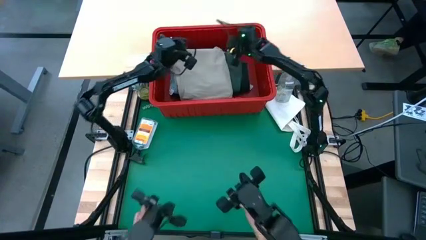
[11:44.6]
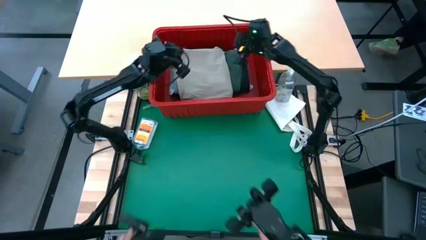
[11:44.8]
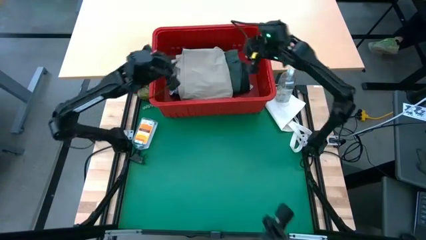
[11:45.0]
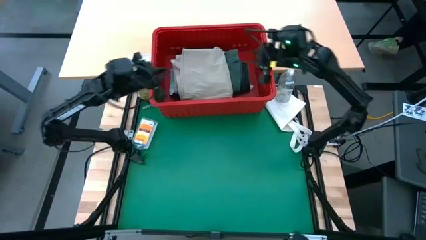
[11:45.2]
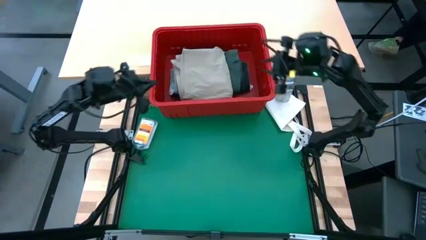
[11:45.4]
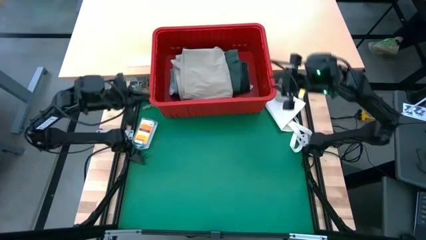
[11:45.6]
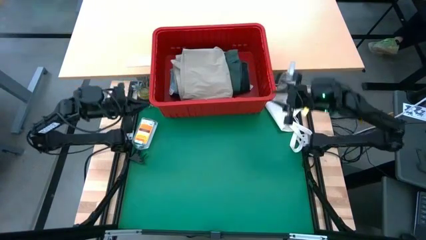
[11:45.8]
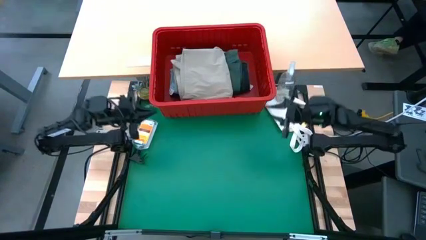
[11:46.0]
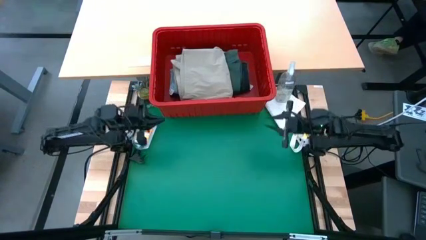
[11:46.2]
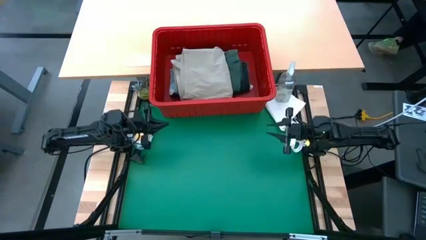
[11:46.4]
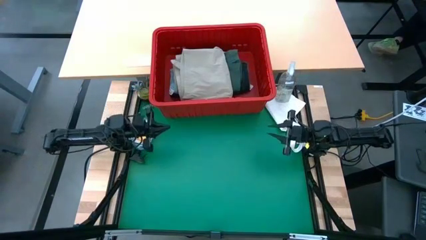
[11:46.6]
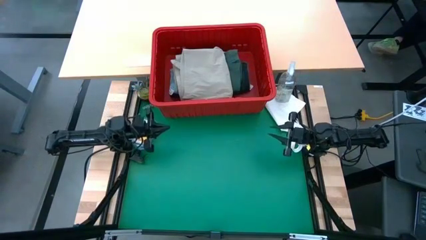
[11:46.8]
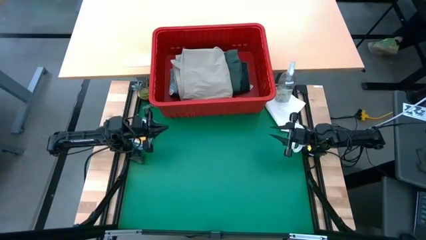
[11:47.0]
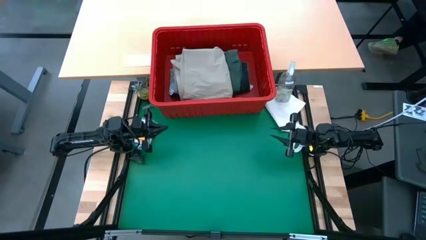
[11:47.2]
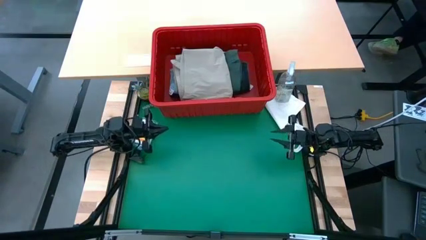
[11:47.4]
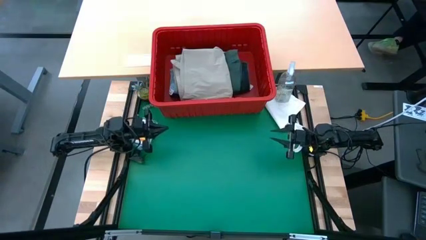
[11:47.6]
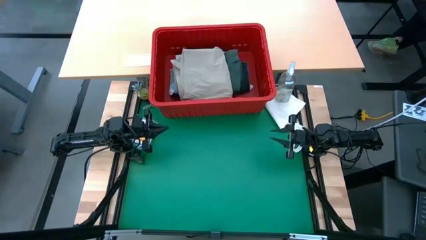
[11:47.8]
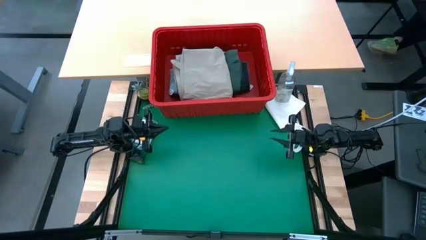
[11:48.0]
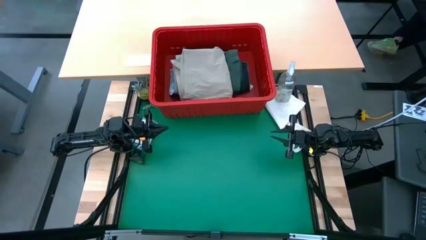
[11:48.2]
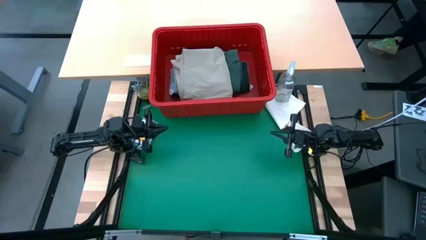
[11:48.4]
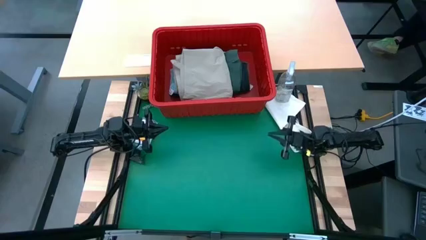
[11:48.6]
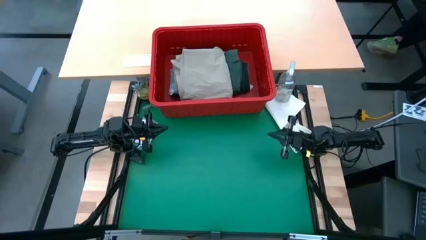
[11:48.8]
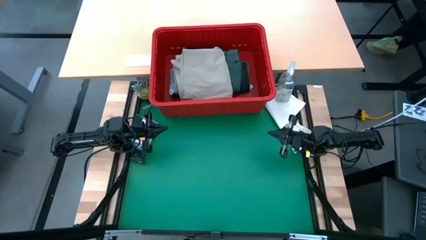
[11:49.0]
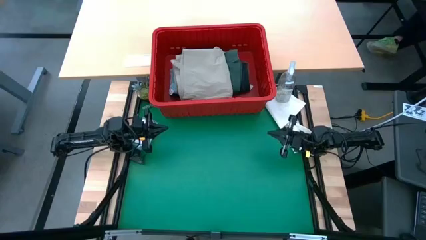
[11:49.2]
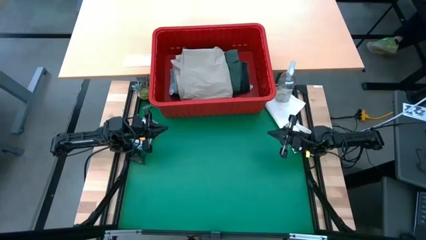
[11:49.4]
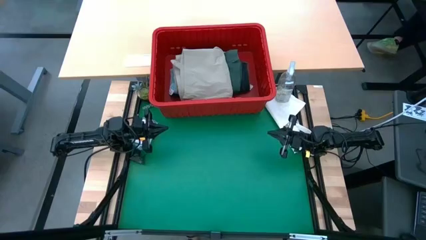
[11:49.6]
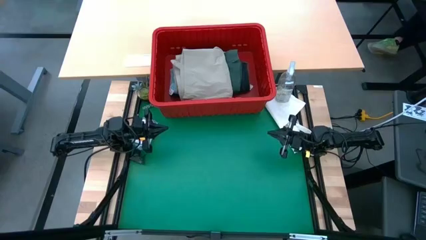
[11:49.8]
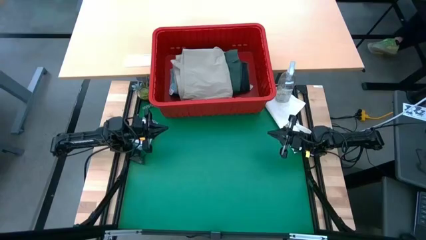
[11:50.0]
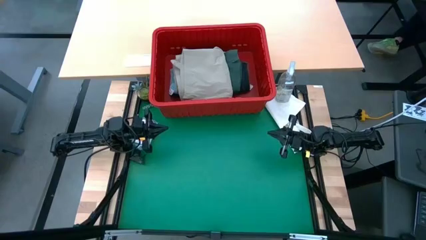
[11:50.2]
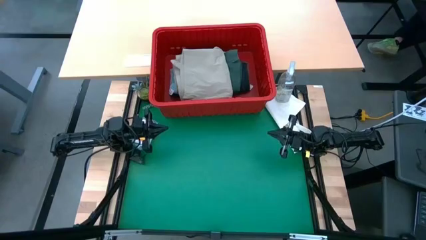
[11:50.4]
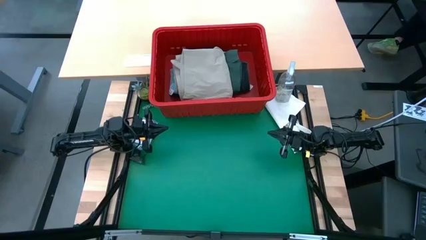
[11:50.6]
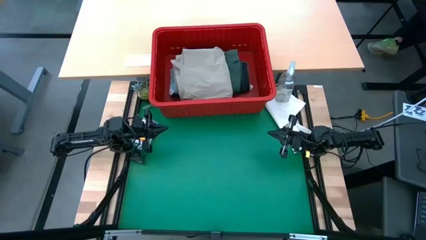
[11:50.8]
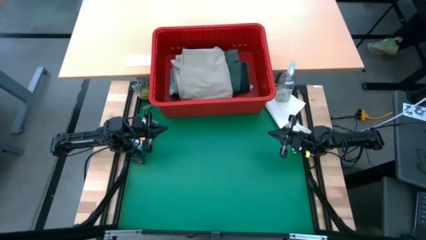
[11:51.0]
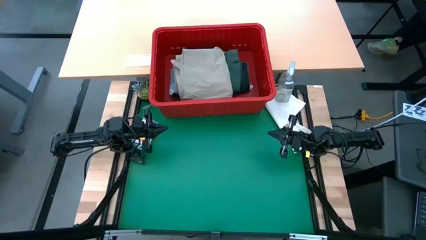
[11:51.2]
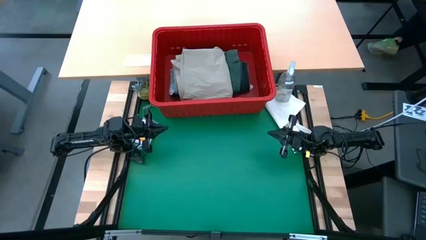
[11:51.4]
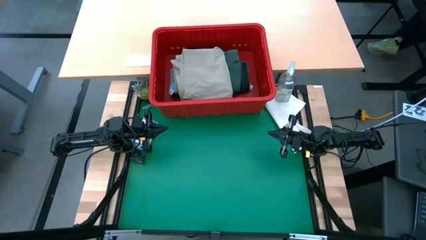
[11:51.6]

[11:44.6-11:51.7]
Task: Fold laundry
Return to Home Position

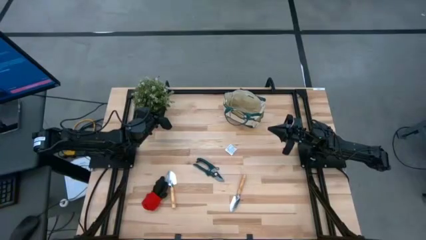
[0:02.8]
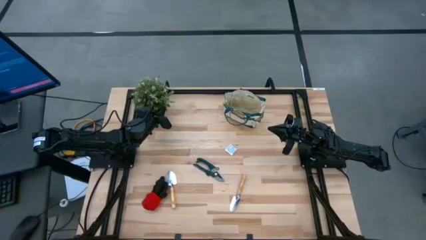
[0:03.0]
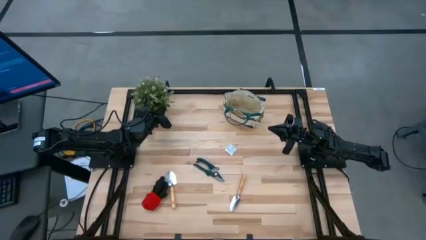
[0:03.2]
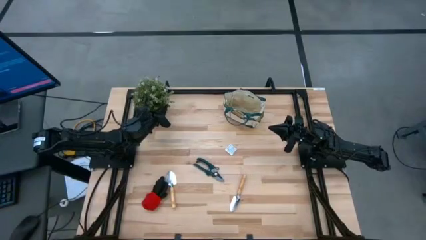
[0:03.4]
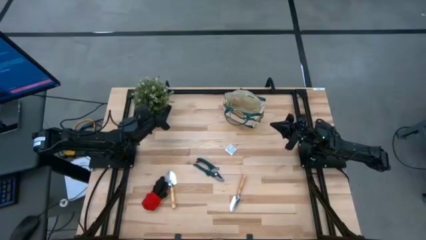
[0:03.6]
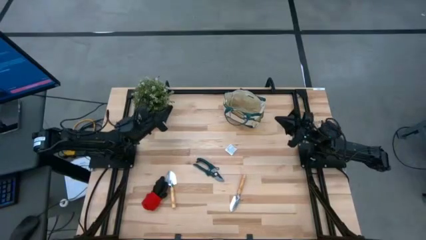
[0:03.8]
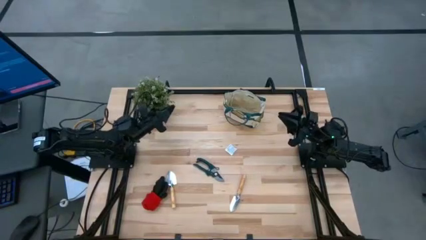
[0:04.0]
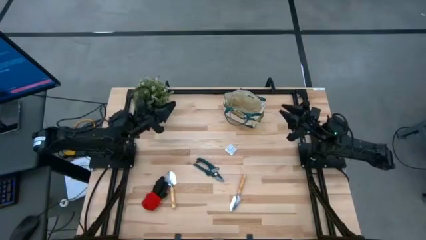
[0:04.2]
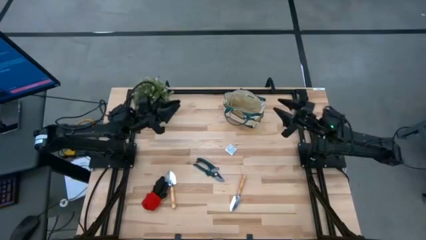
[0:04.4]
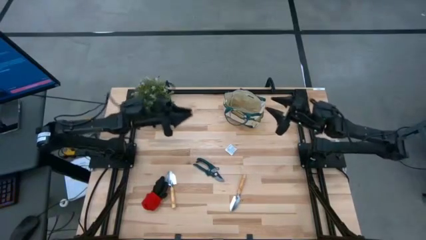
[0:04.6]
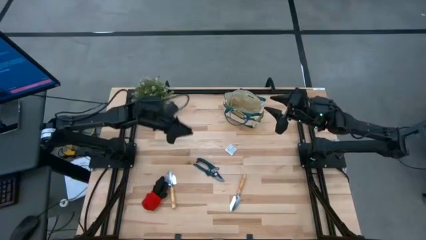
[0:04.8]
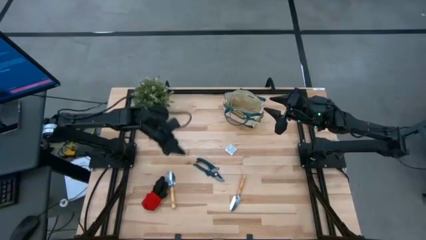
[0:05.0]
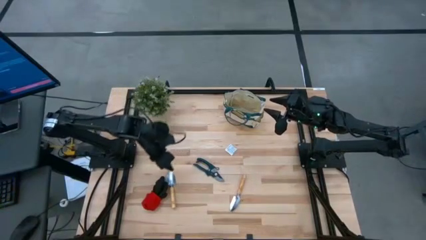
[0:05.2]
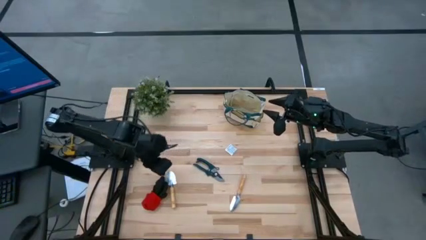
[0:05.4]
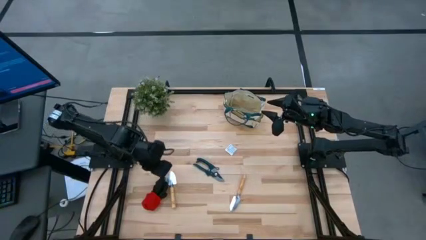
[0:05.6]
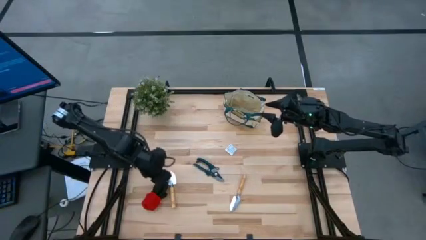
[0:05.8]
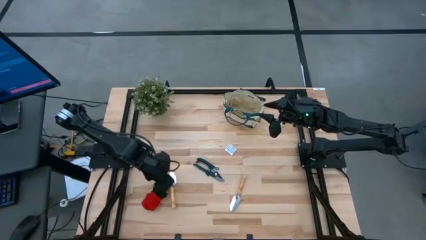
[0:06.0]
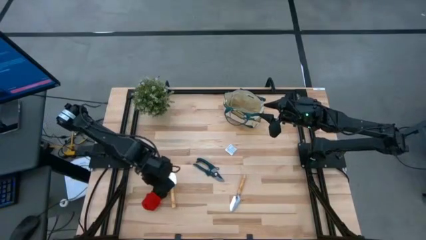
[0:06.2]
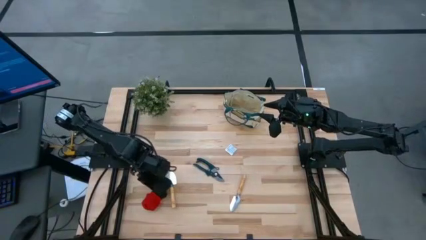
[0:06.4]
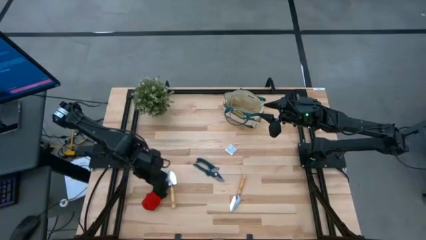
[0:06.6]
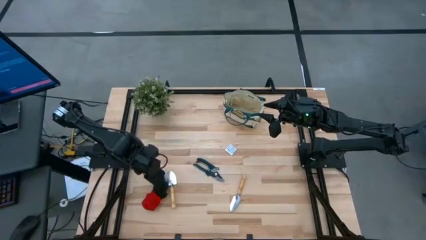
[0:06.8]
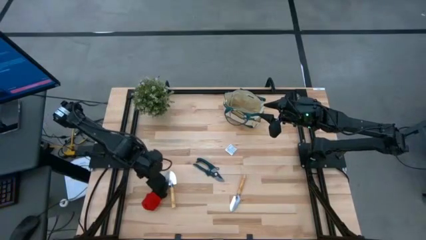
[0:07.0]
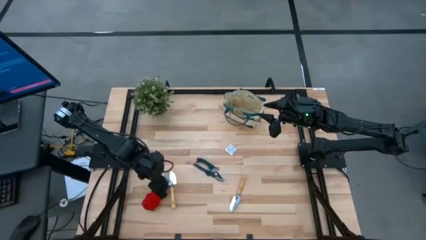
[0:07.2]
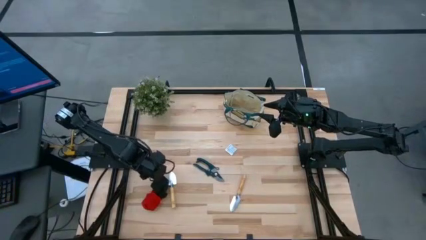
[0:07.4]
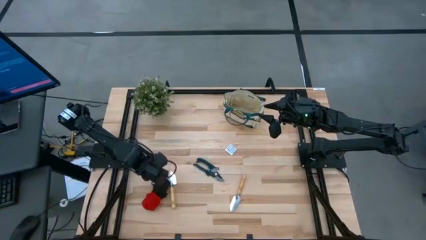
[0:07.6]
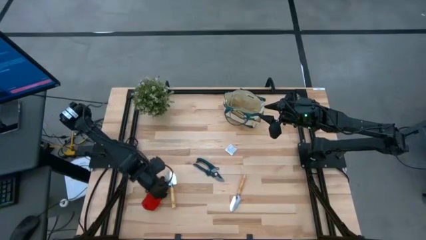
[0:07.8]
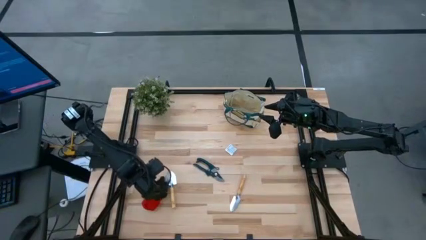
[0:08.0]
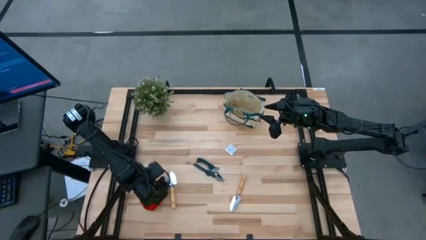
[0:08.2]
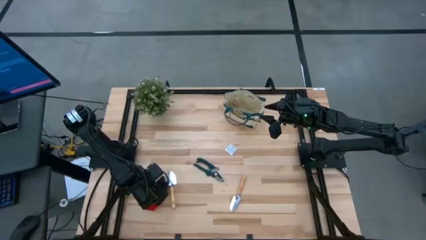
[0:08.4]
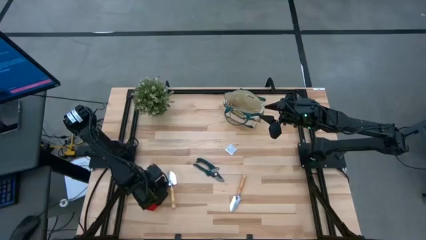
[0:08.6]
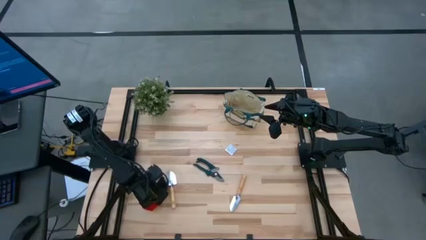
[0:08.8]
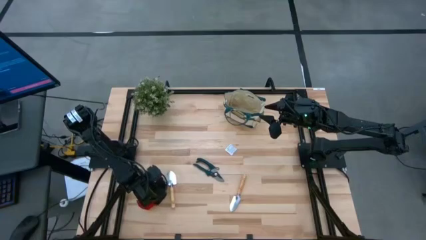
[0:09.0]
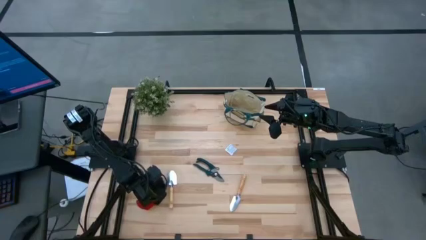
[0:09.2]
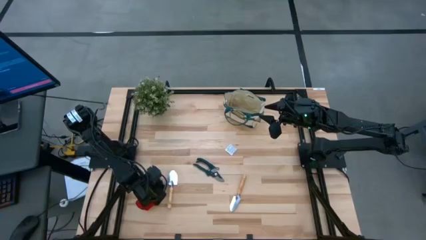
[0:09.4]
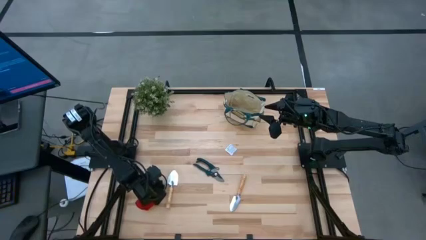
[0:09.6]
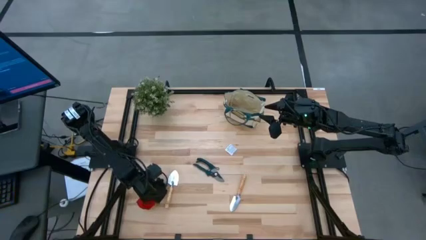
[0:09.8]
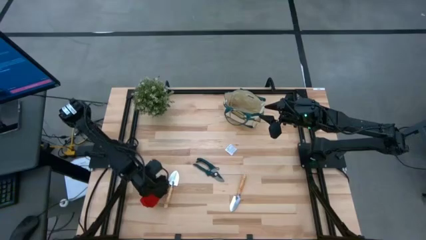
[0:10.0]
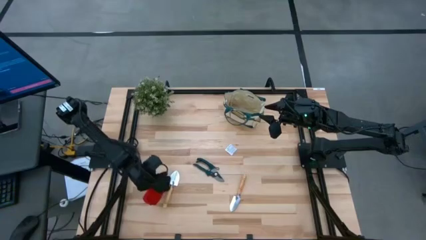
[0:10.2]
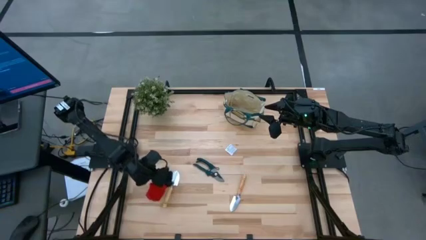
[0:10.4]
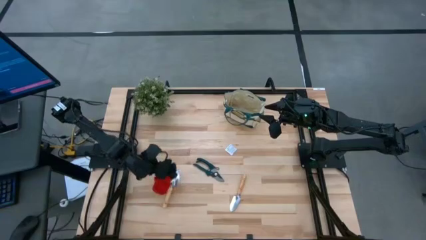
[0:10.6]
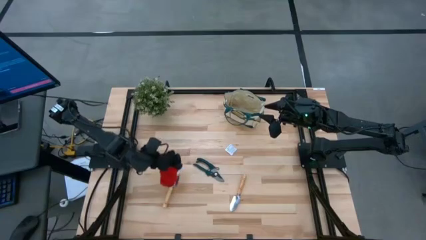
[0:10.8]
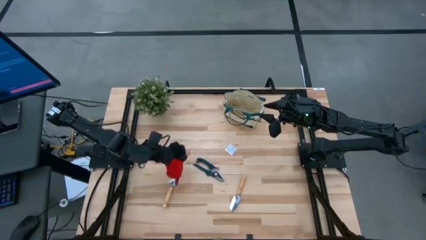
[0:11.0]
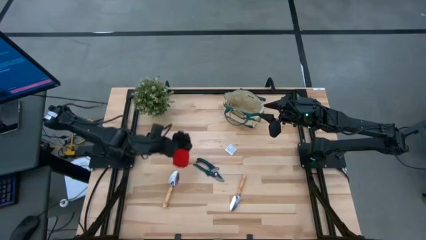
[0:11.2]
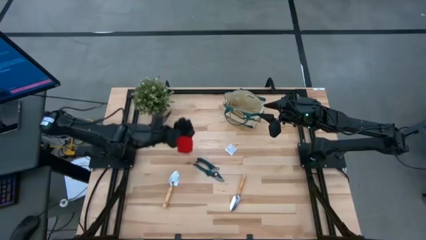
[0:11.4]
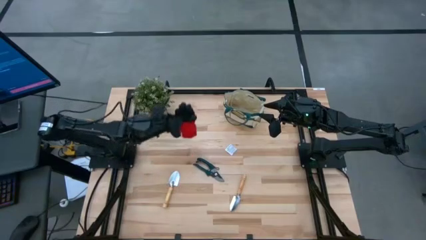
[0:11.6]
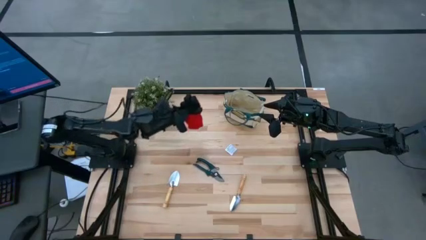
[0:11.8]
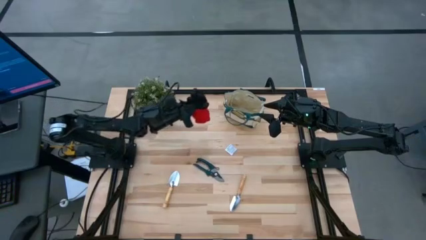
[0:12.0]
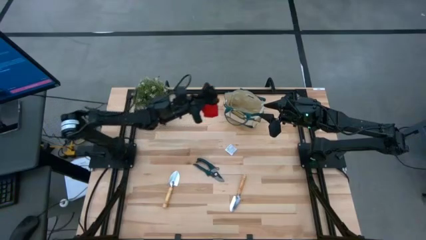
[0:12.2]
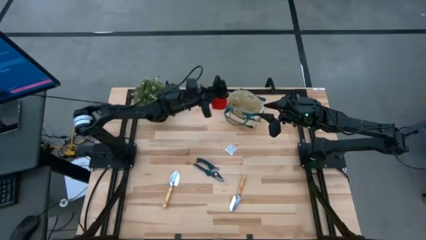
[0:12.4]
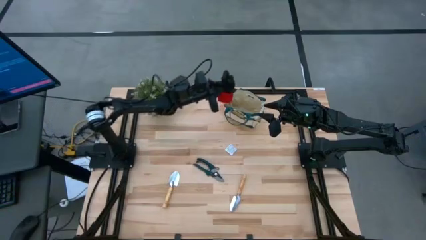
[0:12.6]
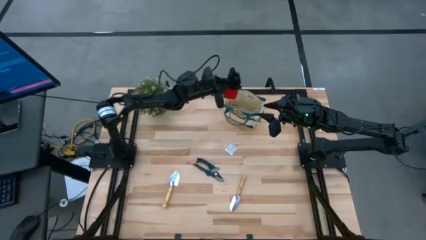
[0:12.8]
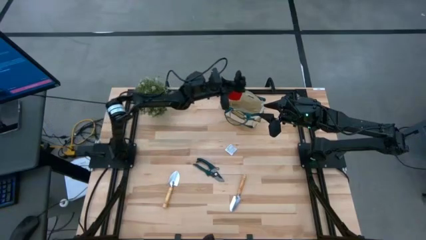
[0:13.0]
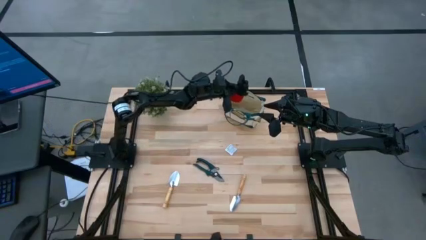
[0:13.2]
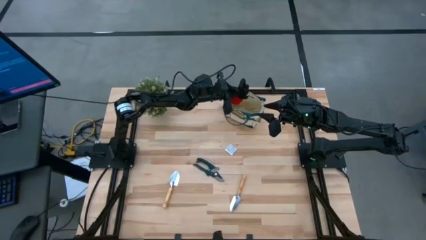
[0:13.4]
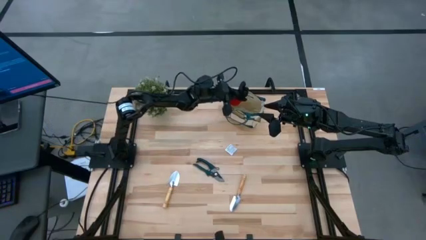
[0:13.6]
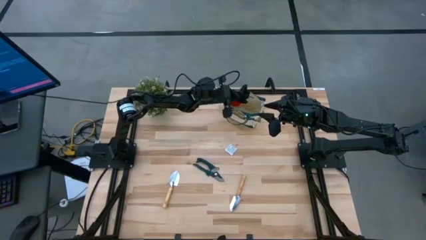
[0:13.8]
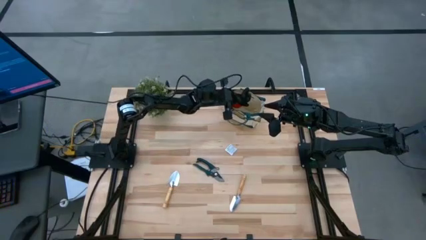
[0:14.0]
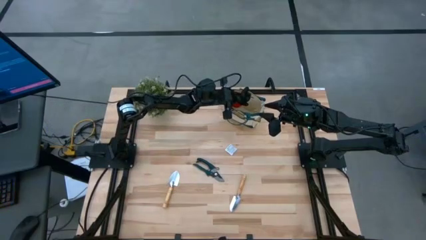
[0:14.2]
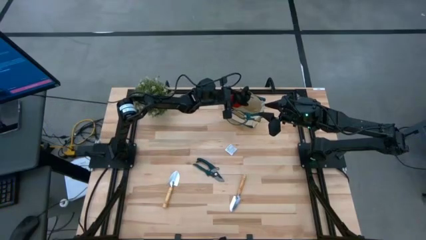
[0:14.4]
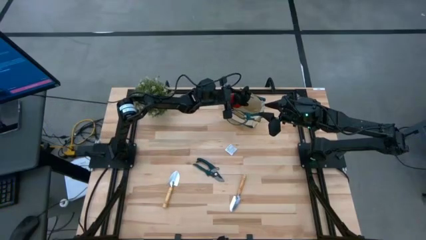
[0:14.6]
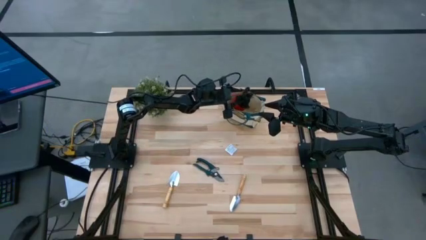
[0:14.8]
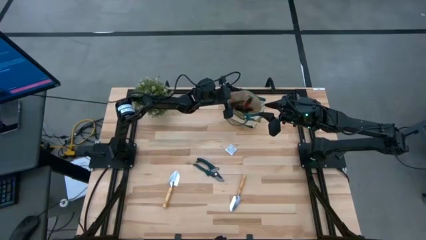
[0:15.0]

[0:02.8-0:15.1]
Task: Pick & Place Garden tools in Gardening bag
Put the red gloves into the gardening bag
